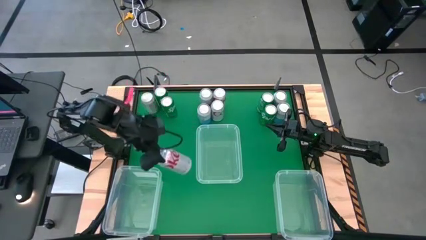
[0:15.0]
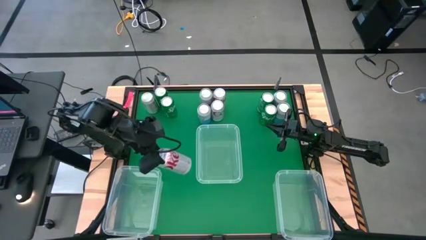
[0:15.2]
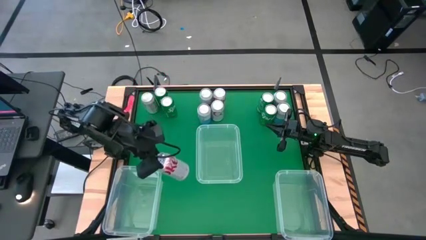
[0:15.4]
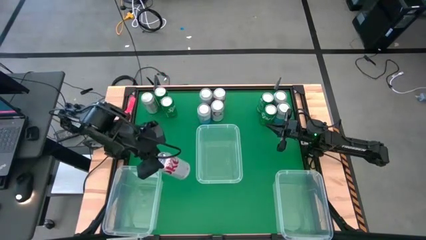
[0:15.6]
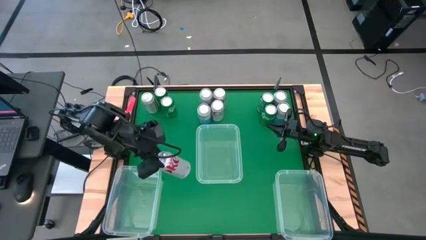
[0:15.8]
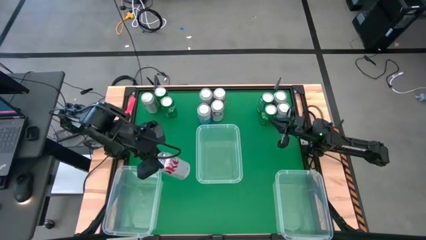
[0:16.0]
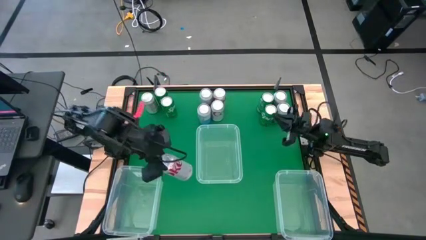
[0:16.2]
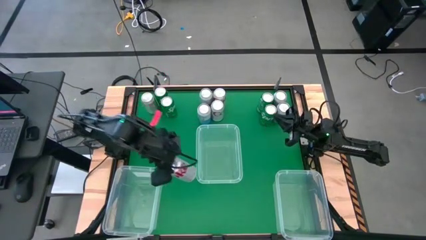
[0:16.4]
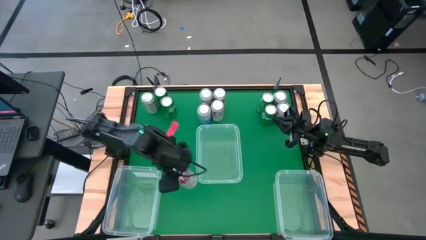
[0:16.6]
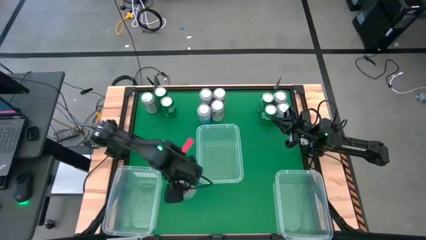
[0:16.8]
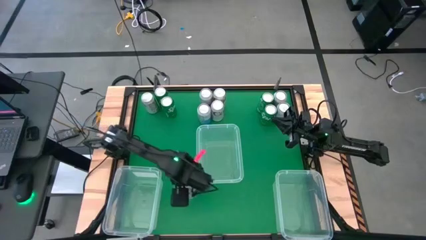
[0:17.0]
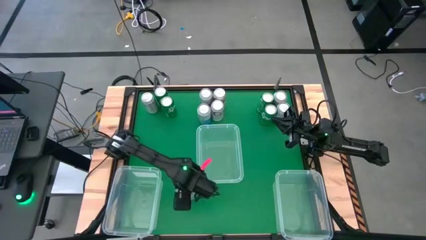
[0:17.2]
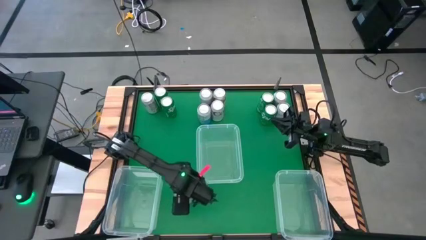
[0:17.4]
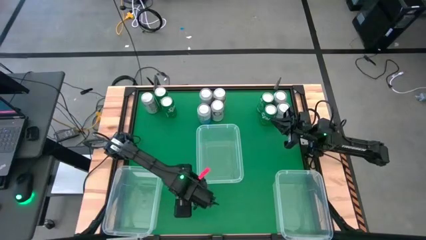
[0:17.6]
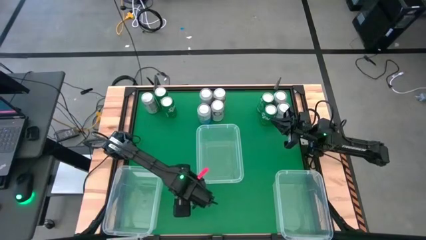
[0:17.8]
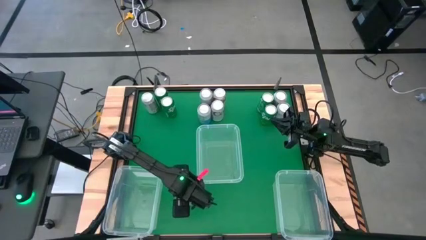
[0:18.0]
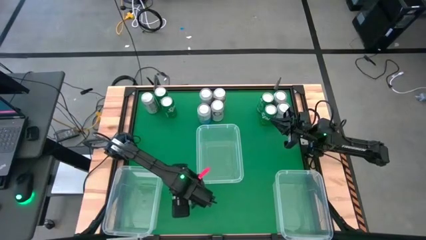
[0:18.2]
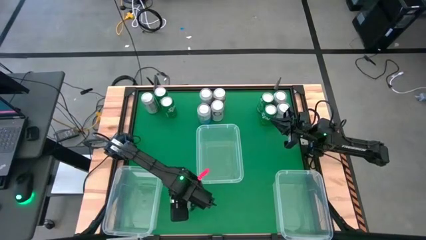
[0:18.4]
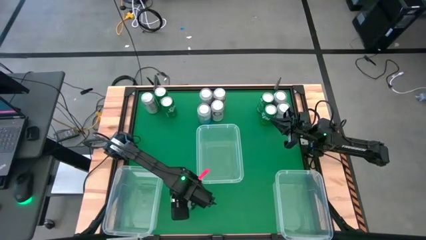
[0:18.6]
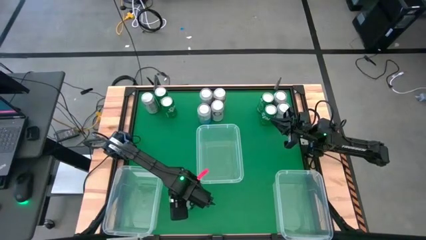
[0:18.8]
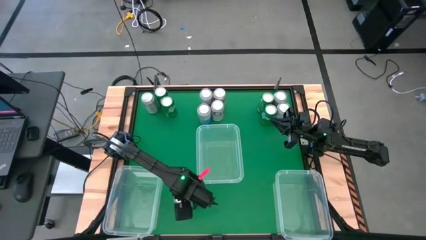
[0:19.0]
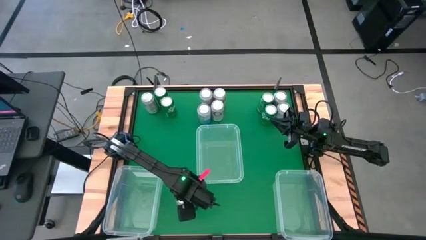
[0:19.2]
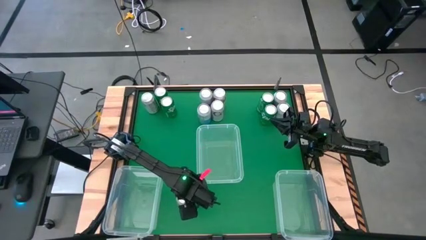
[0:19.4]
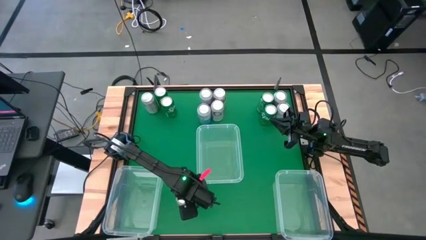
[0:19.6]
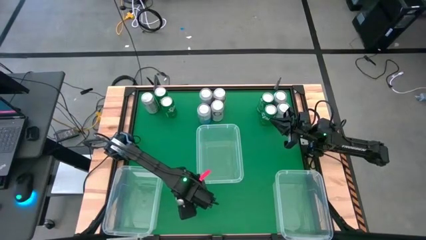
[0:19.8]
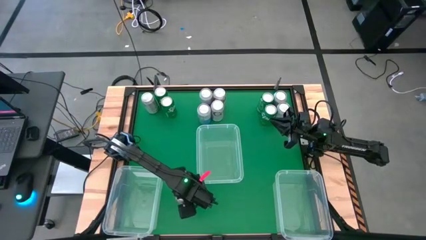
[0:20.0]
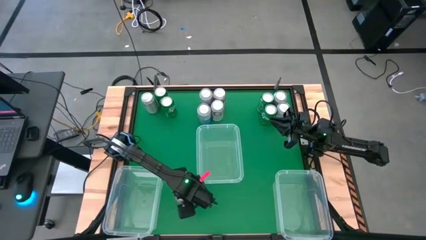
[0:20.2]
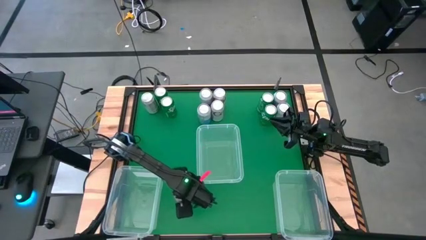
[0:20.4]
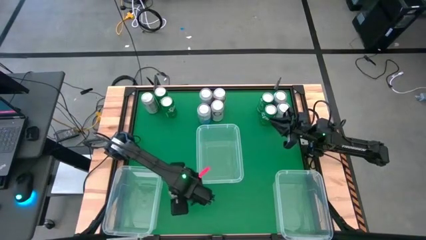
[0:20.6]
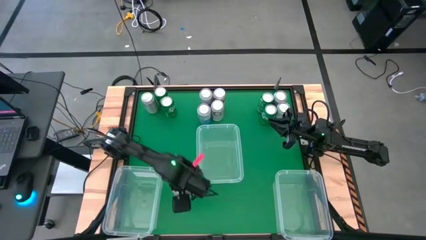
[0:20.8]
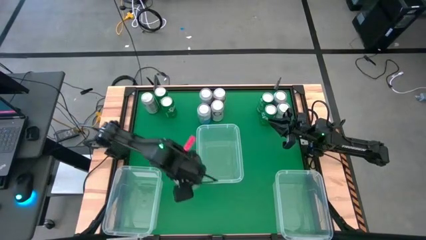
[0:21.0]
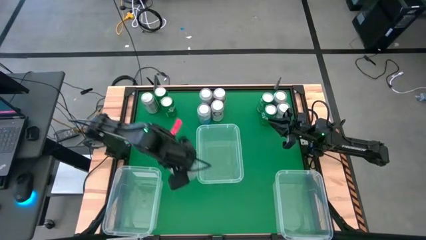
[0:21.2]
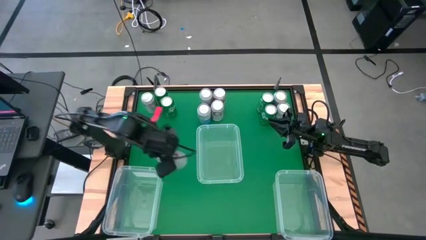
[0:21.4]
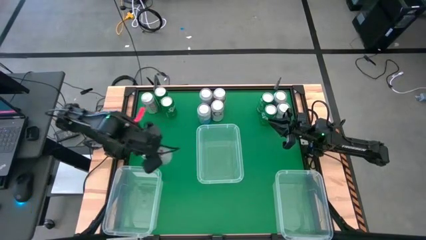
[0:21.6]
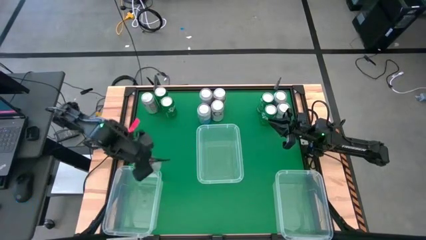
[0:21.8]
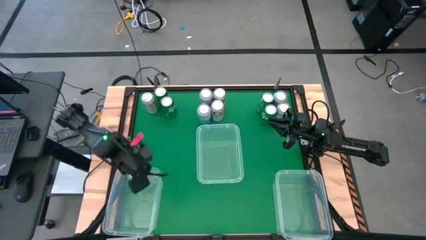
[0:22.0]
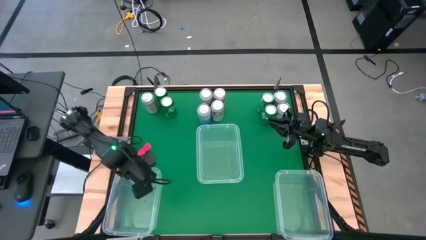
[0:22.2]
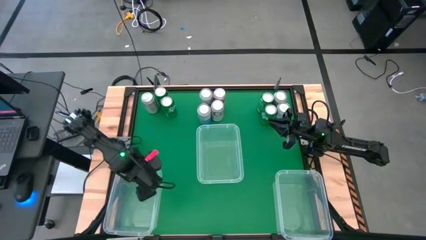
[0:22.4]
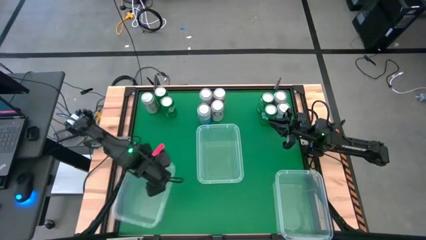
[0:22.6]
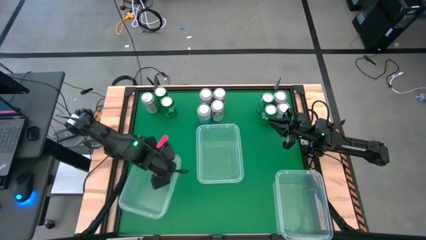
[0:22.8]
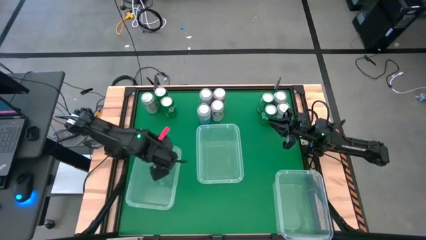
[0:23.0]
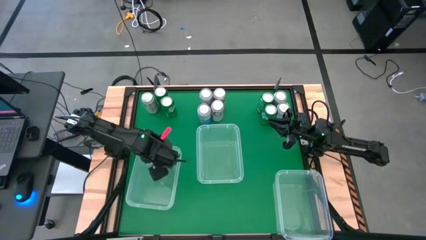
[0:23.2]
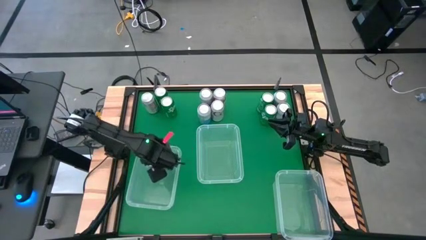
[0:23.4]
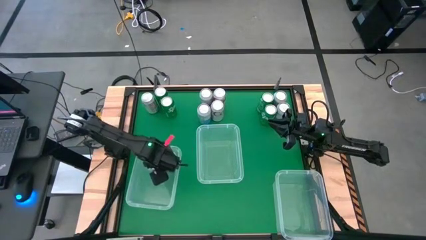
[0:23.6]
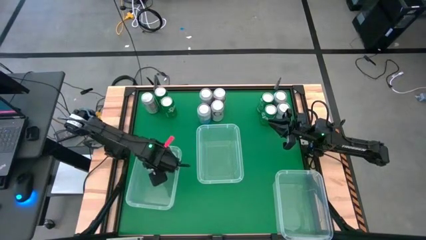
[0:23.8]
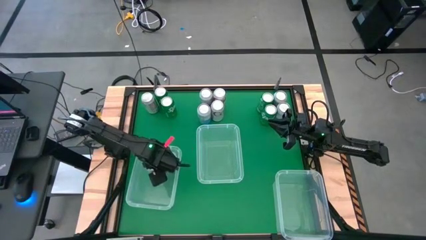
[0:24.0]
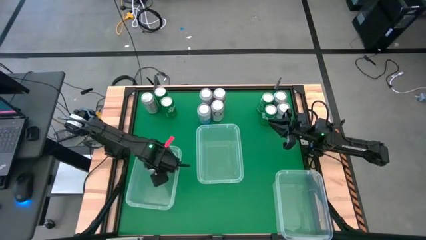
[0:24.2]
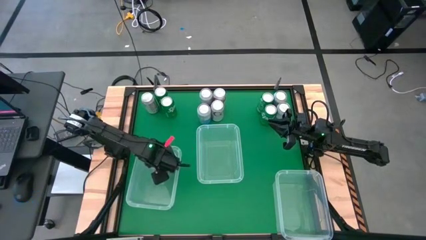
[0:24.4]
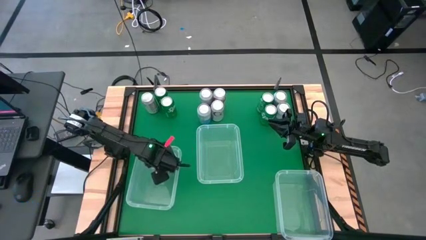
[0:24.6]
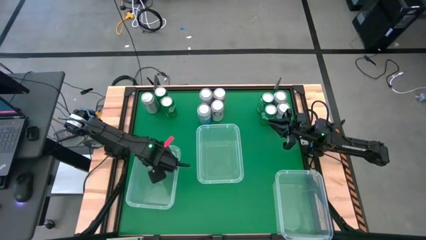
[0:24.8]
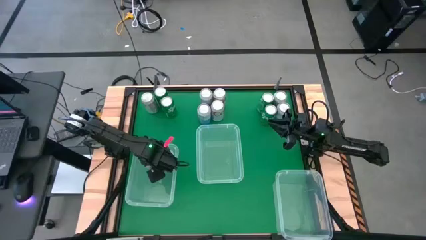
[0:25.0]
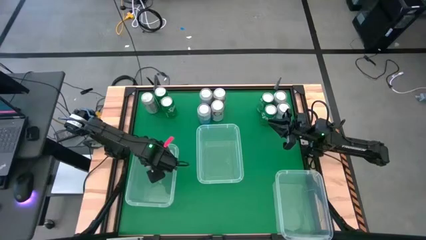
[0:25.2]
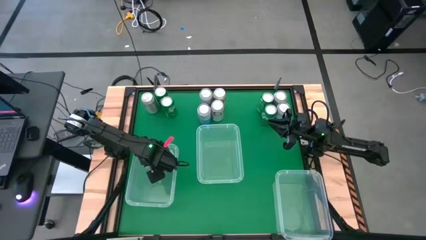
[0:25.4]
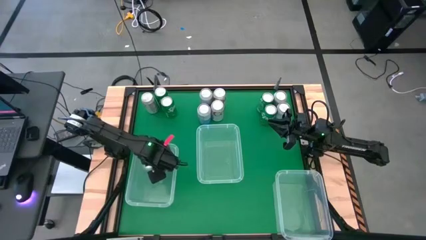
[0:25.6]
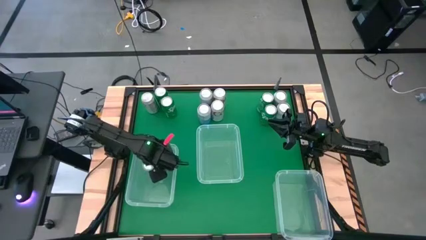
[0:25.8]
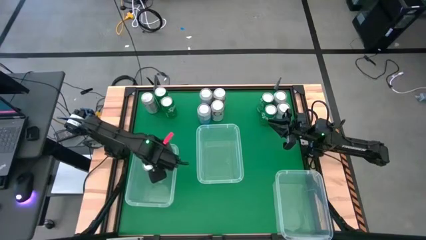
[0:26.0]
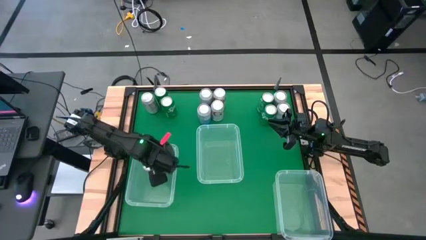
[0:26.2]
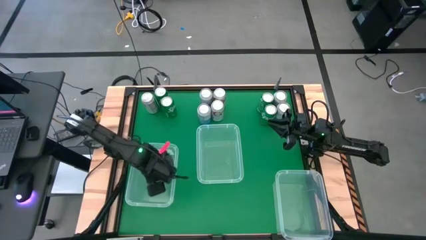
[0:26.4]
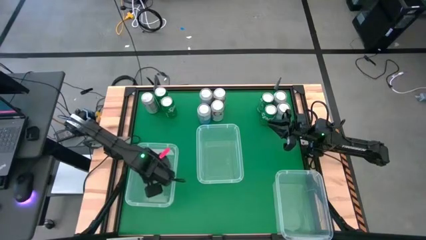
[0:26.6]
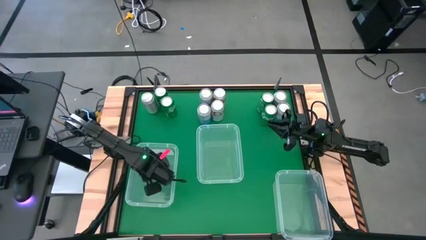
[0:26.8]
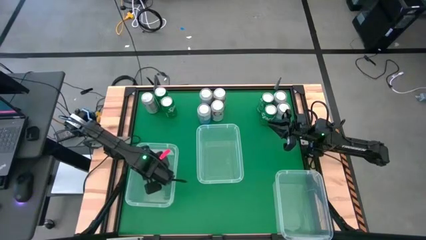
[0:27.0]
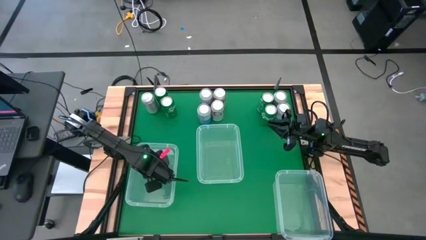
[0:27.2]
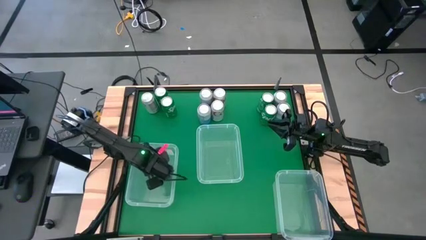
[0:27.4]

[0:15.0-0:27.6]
Task: Sort soda cans
Put the silver soda can into the bottom left transparent bin

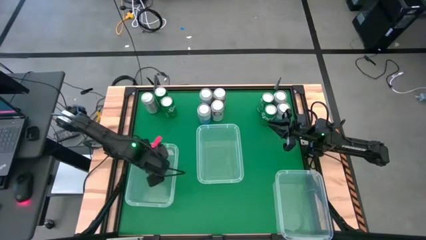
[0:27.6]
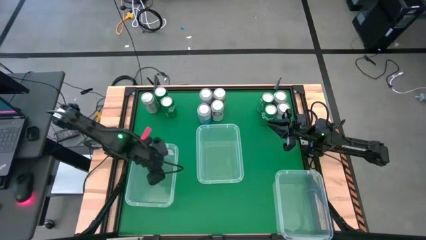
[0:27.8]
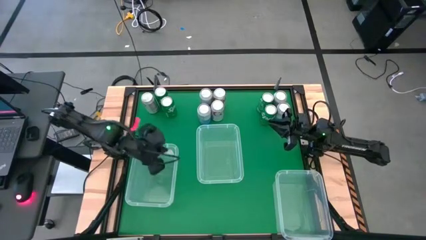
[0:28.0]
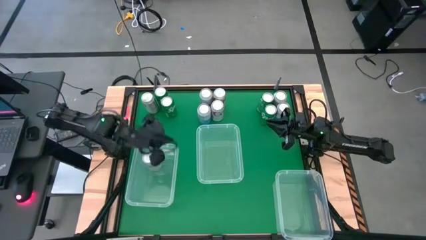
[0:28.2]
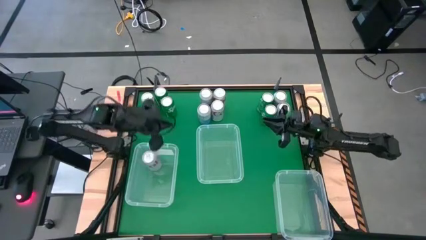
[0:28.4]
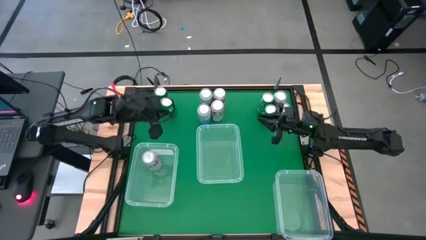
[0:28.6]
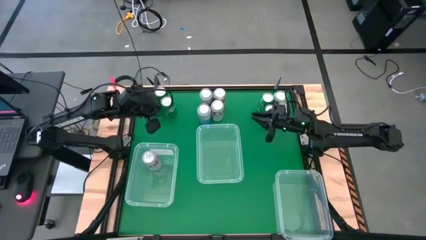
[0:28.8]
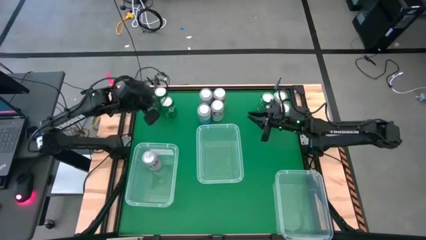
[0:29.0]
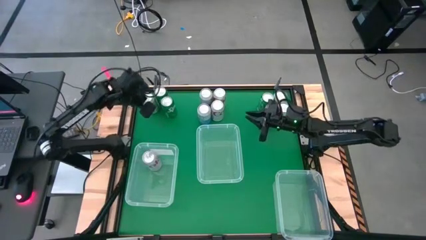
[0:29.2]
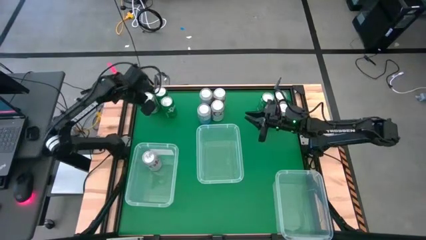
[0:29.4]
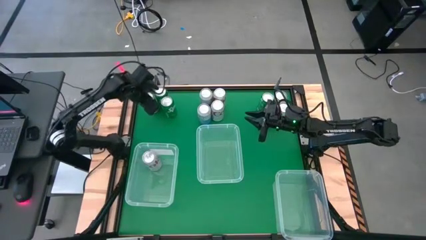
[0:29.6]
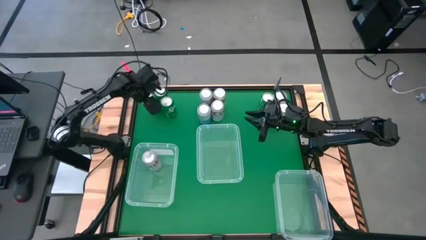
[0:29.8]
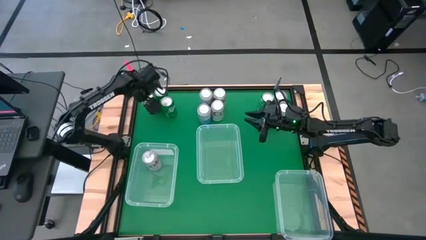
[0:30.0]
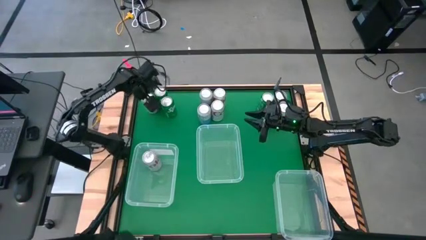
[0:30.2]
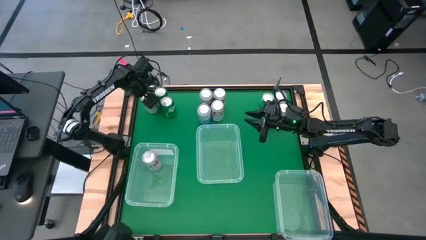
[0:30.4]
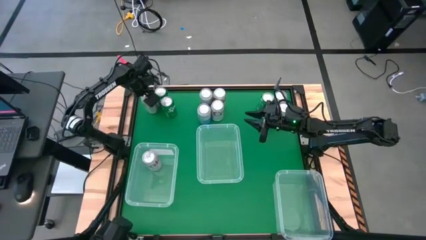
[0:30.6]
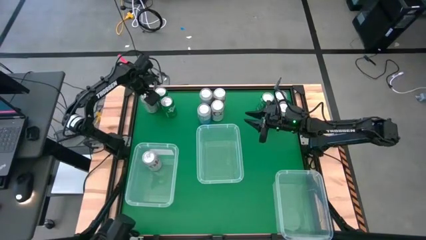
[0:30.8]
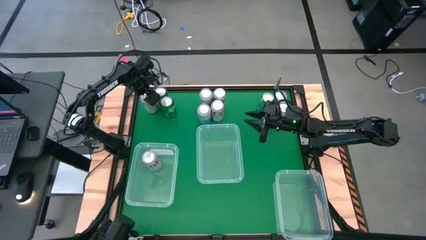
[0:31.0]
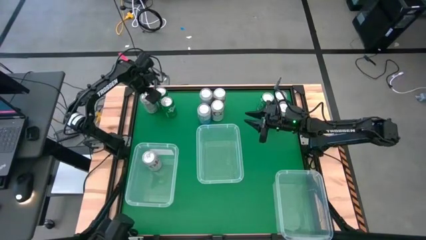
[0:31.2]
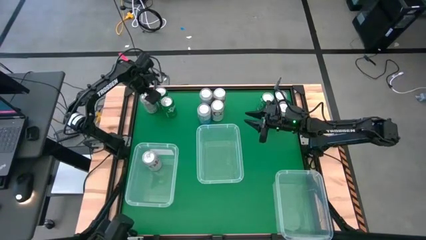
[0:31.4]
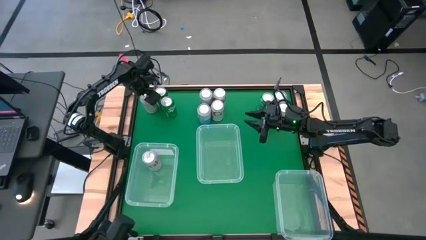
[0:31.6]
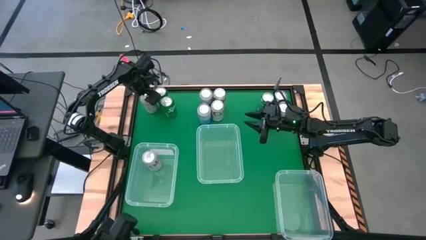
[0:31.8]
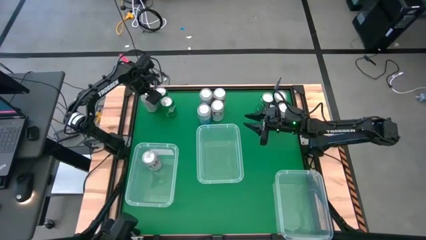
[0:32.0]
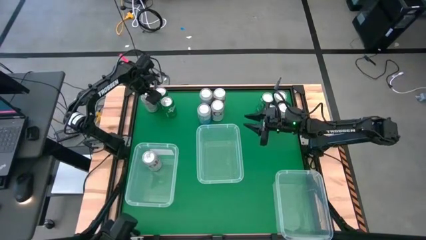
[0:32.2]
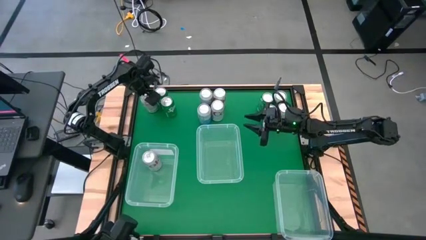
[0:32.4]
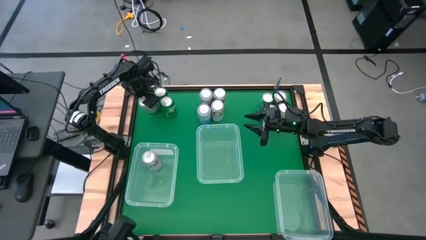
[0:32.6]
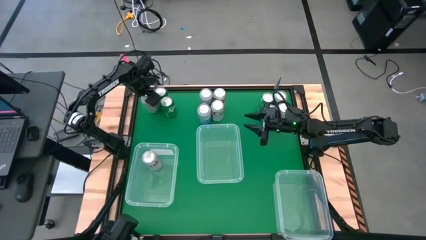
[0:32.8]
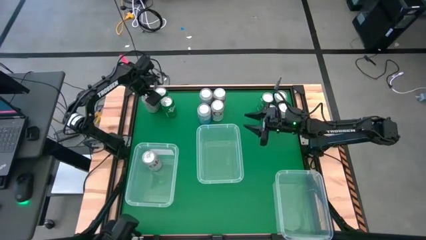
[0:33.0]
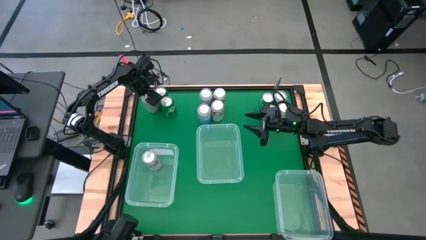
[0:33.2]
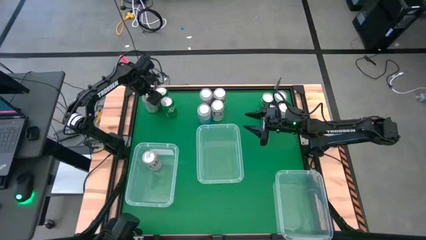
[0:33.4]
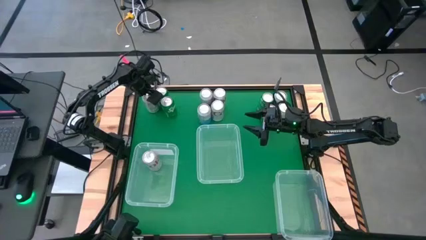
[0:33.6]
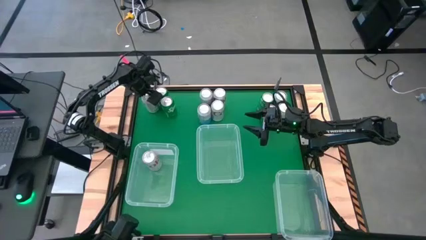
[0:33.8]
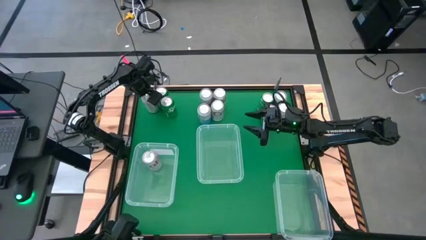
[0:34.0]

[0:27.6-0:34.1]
Put the silver soda can into the bottom left transparent bin
